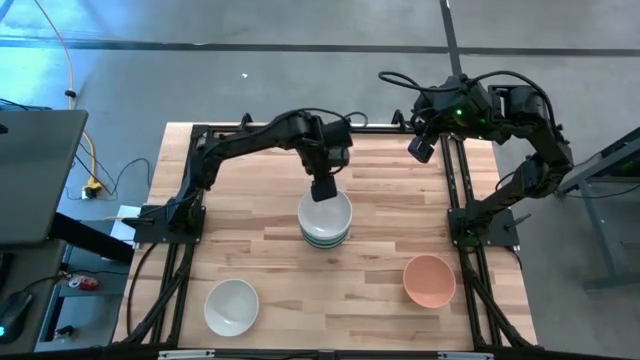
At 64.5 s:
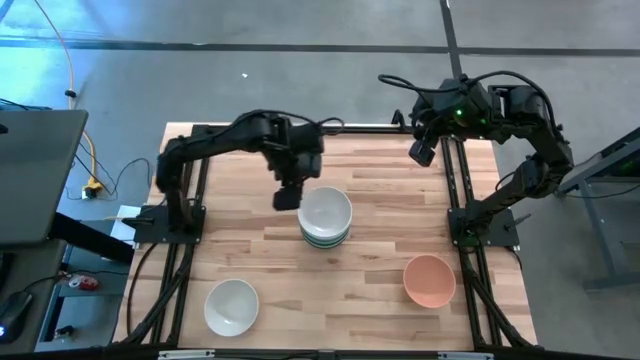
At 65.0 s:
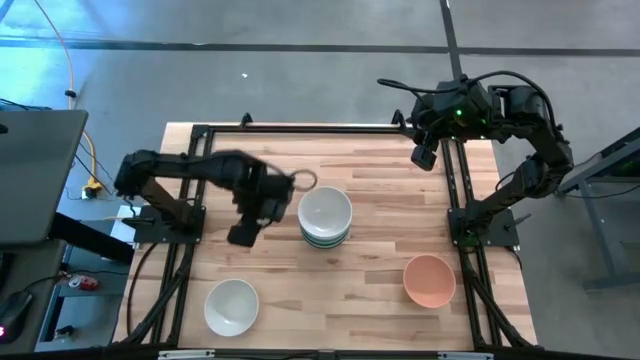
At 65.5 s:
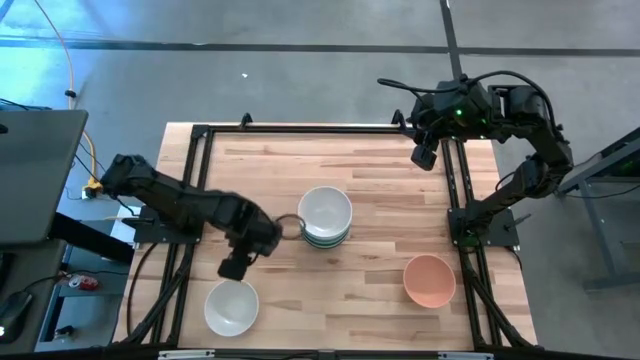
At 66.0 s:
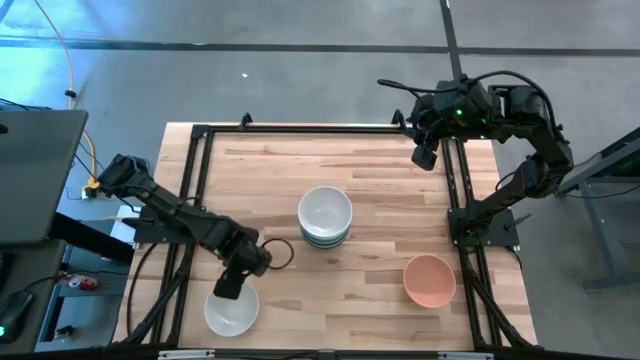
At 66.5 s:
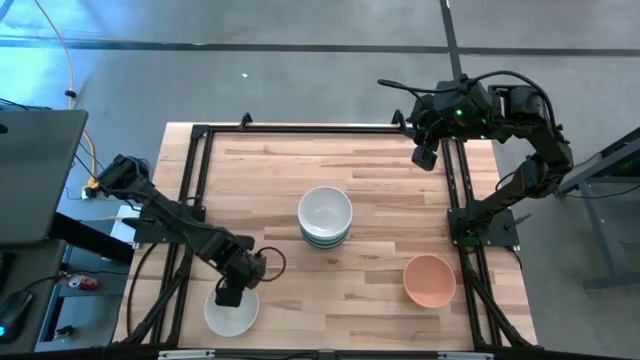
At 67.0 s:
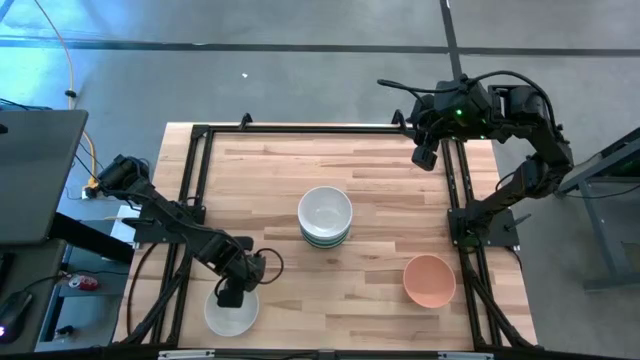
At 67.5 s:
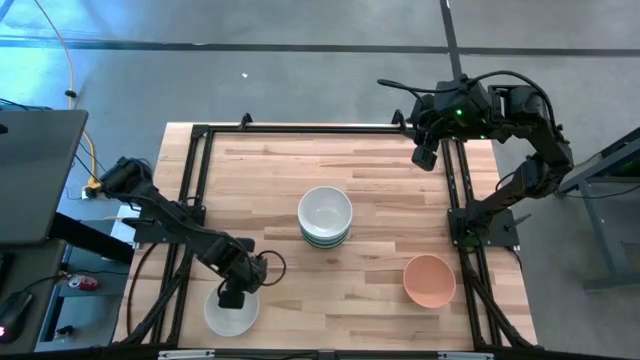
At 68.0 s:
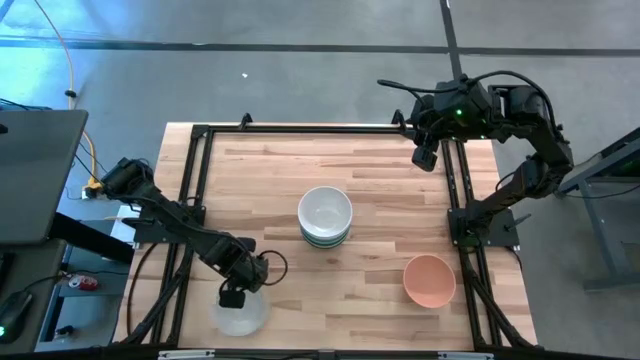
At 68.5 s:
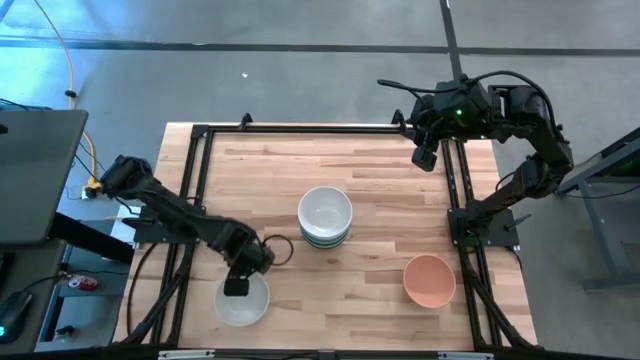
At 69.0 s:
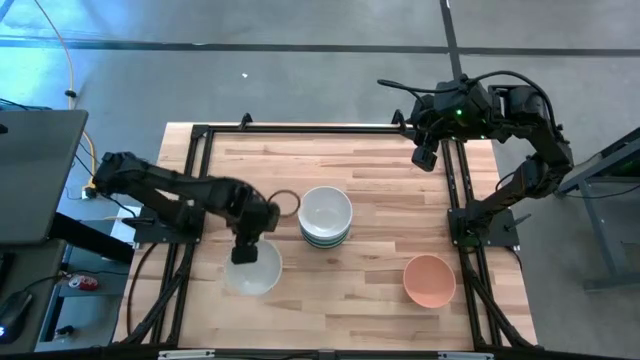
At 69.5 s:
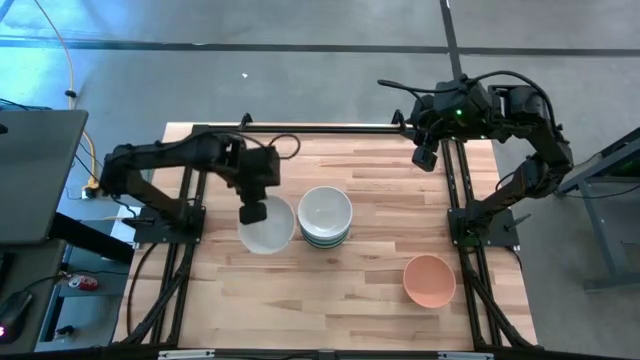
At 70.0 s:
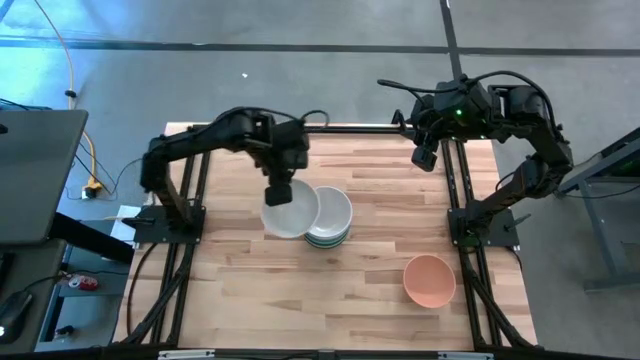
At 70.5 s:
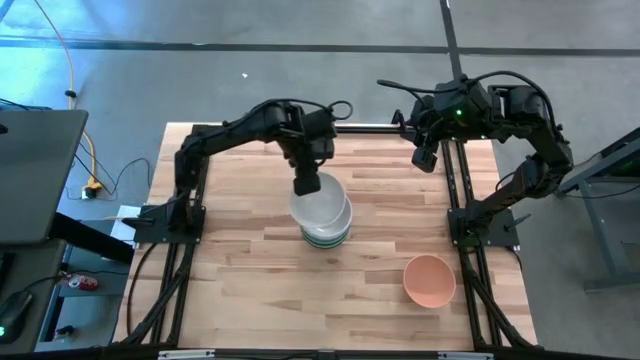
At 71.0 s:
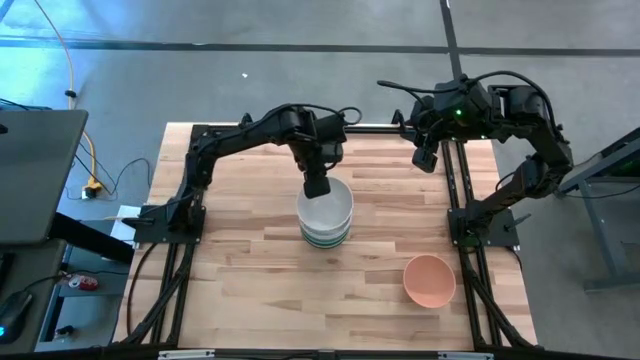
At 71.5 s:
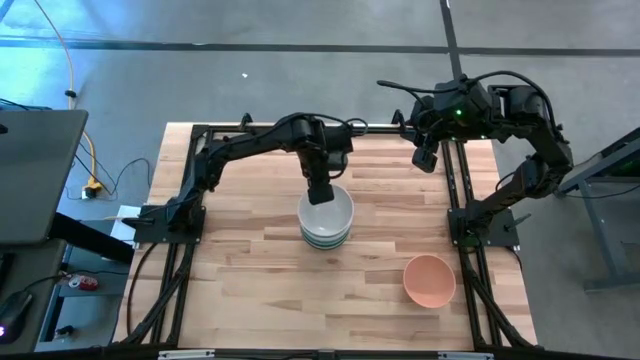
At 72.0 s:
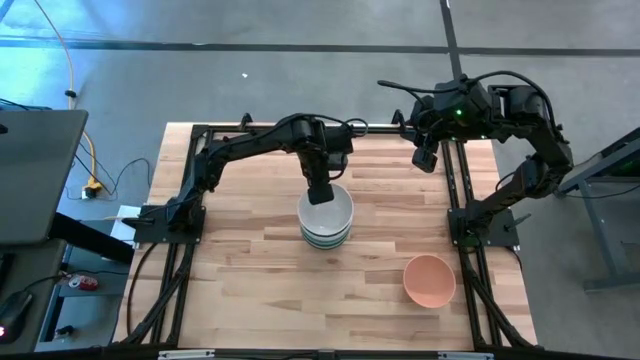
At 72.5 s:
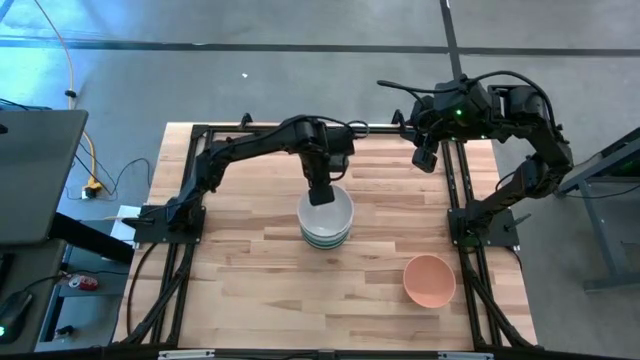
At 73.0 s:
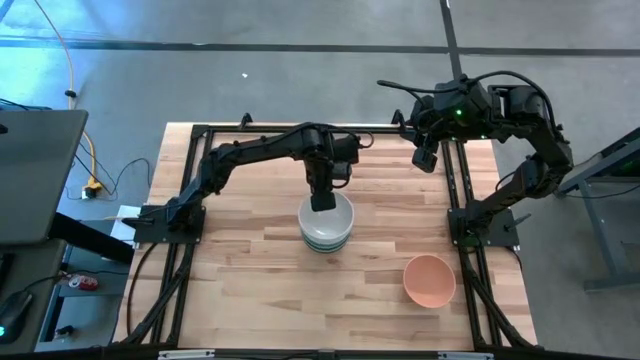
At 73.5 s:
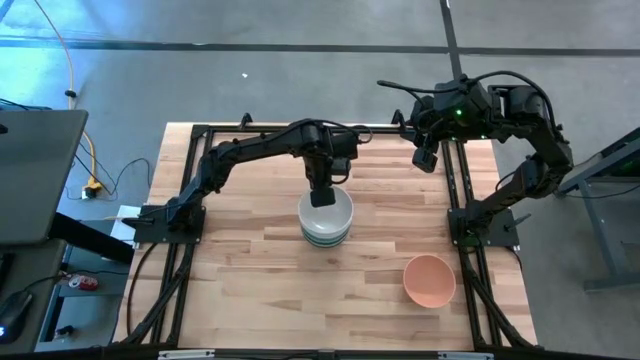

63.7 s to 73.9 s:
Task: Nest bowls inside each other
Stack the white bowl on top of the white bowl

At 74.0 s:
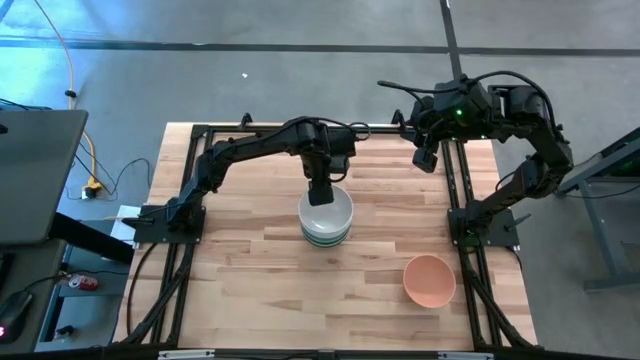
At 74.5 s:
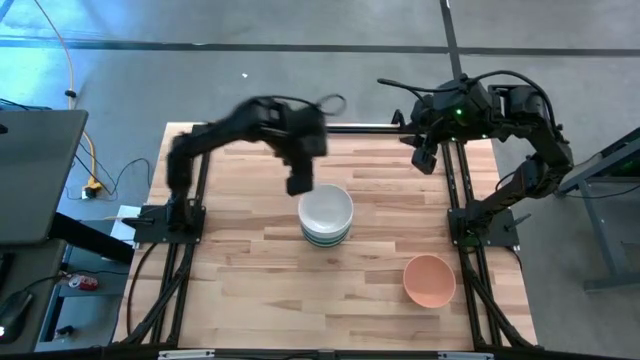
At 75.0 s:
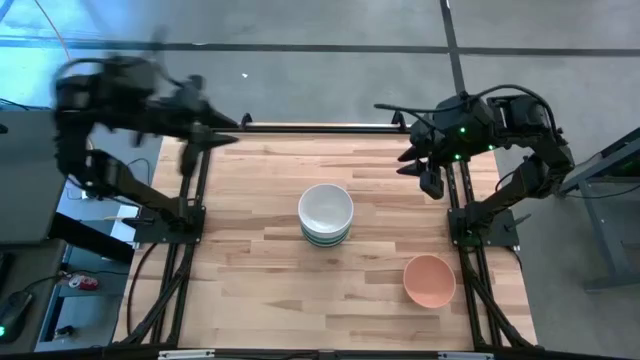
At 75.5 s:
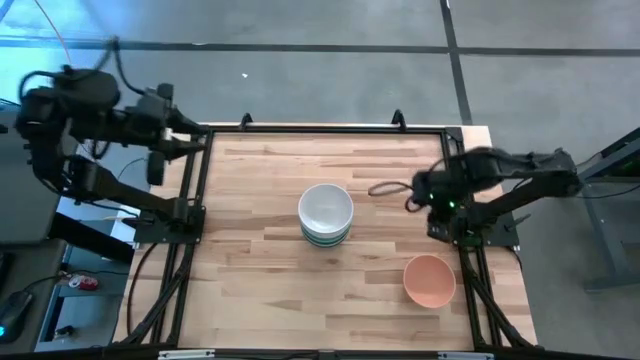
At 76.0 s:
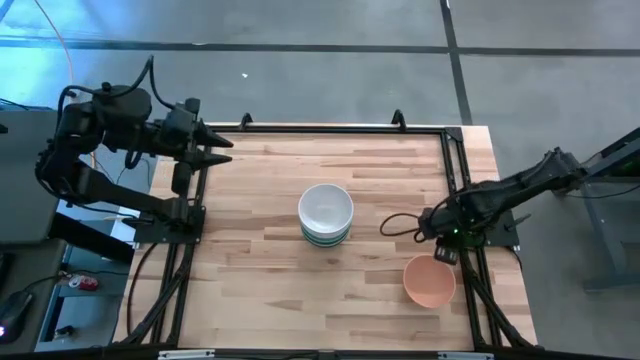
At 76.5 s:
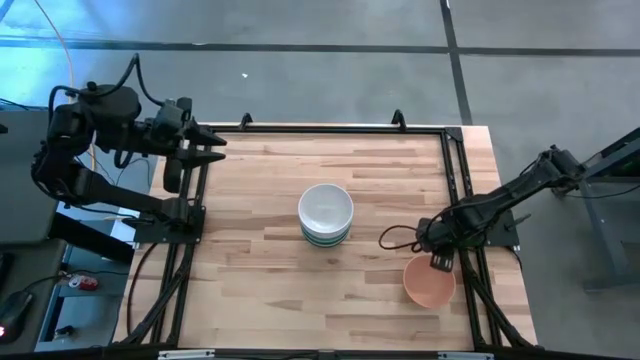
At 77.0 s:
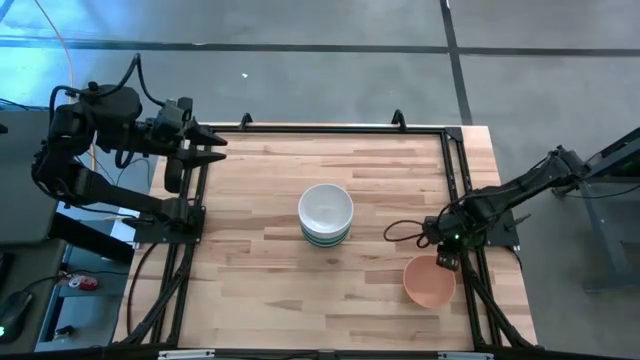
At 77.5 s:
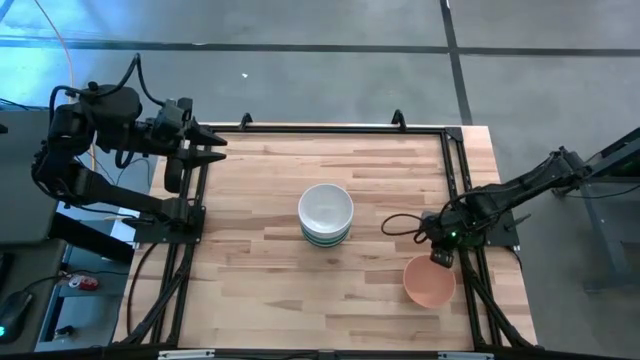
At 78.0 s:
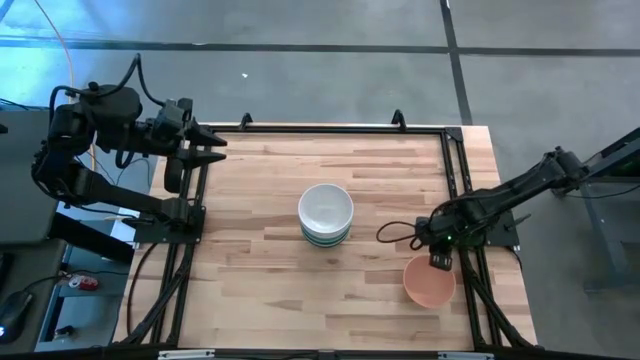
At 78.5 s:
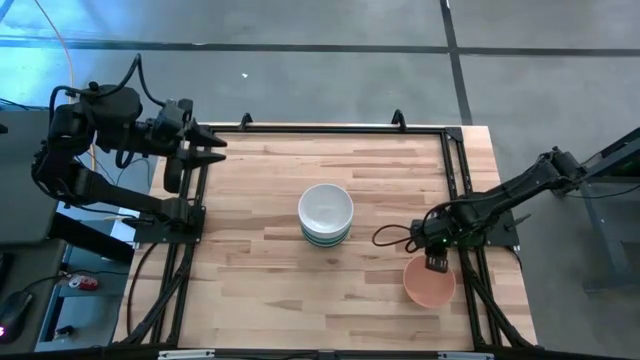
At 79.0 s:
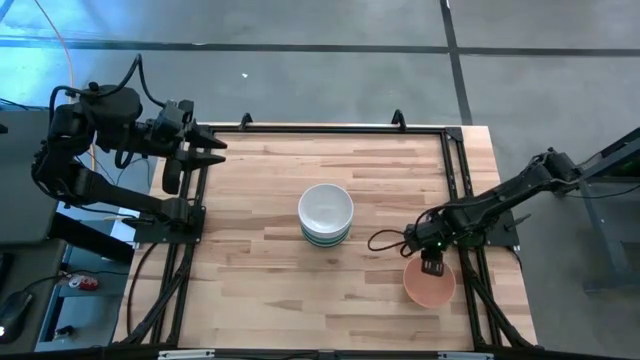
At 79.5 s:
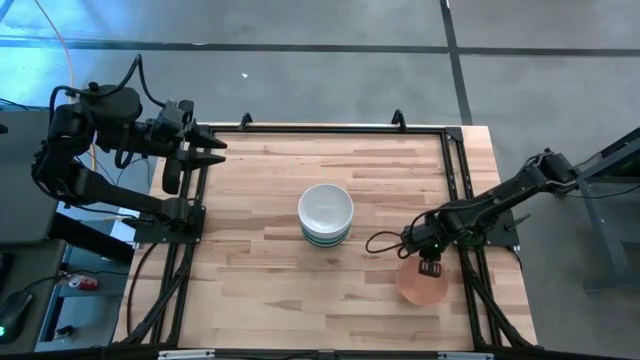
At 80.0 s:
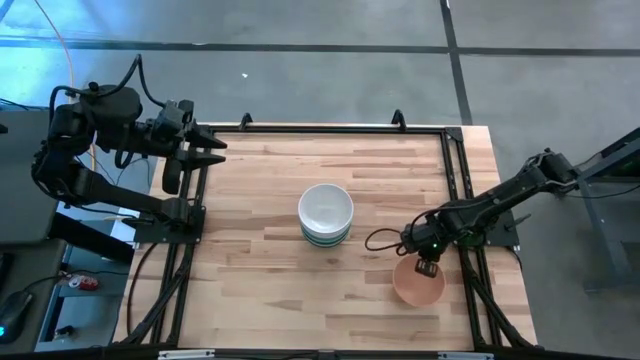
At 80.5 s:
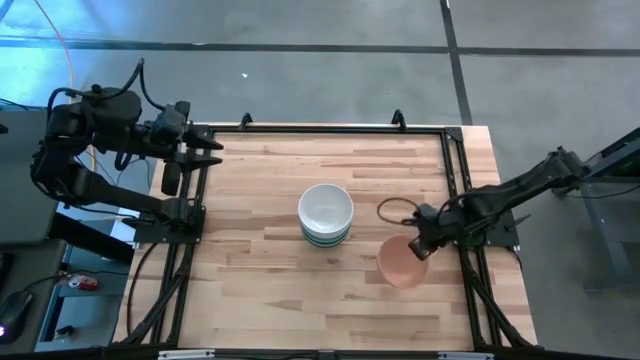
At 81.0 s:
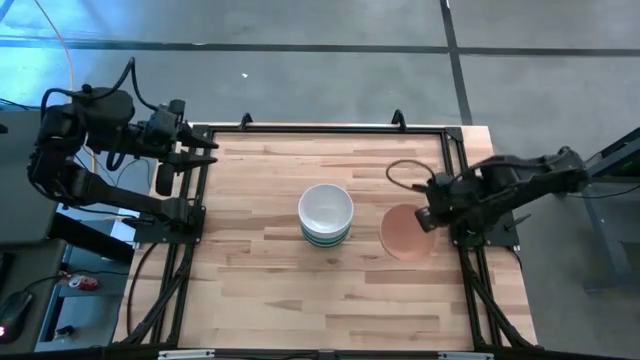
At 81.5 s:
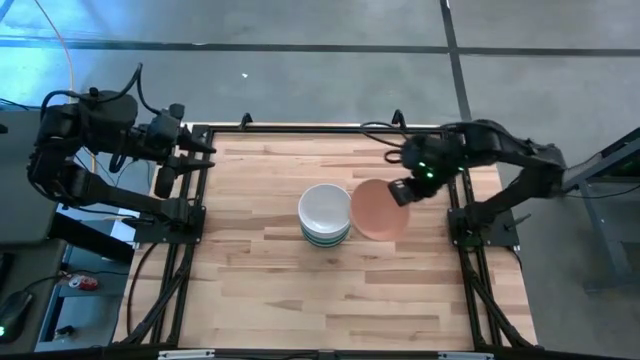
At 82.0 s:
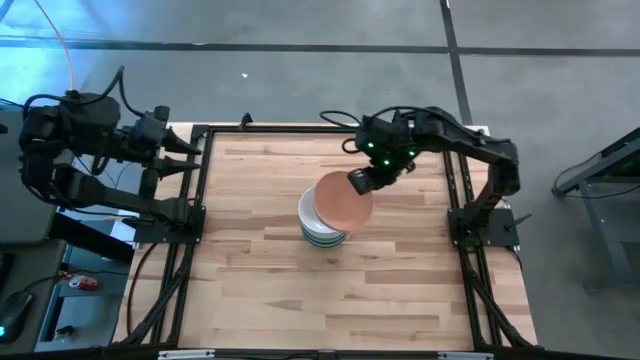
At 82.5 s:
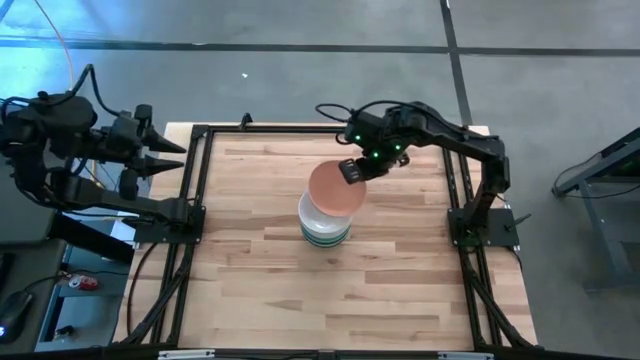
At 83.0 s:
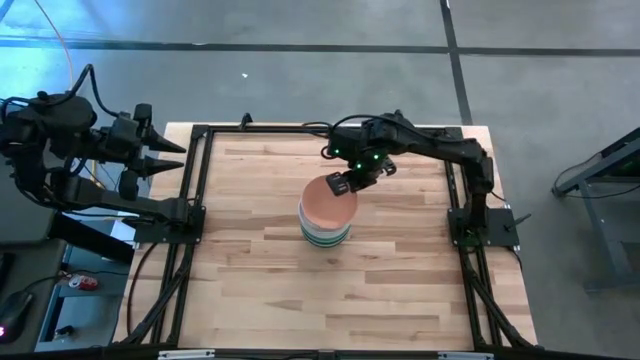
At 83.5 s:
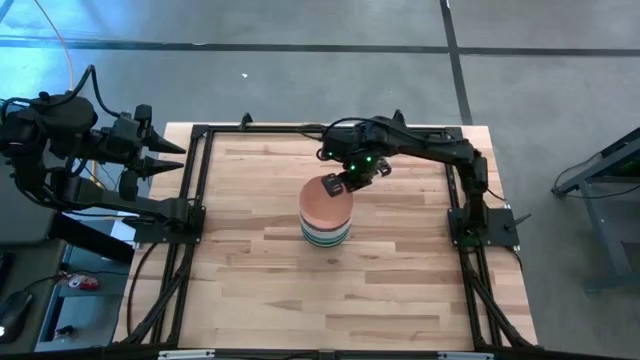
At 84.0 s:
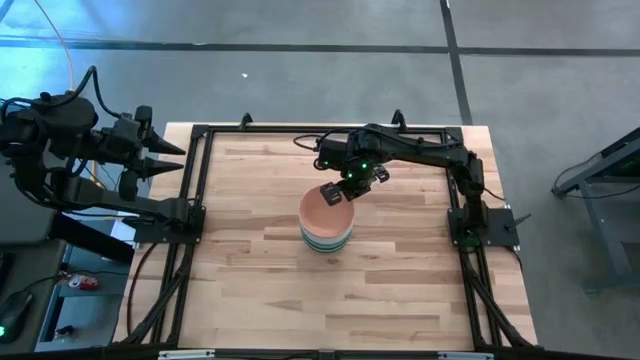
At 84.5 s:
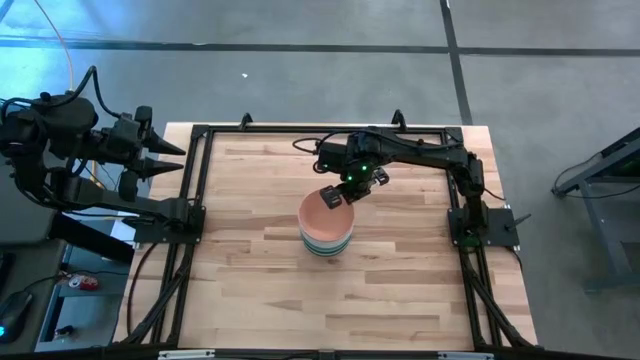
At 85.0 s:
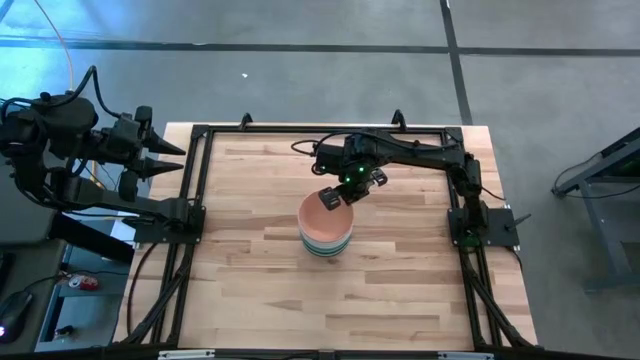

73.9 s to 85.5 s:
Stack the light orange bowl on top of the white bowl
